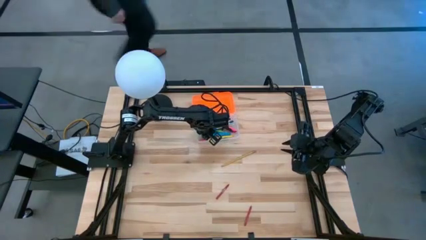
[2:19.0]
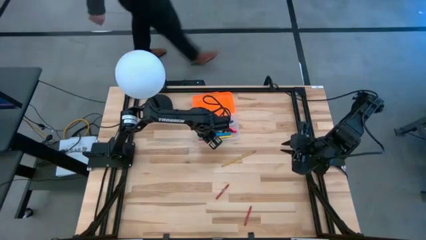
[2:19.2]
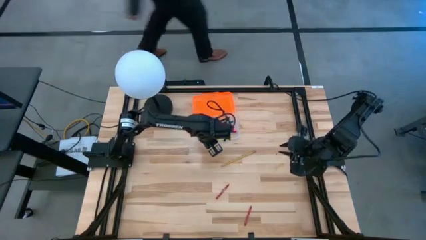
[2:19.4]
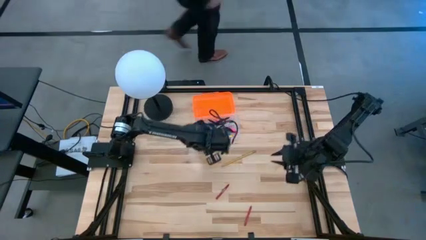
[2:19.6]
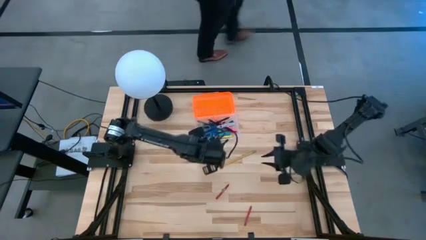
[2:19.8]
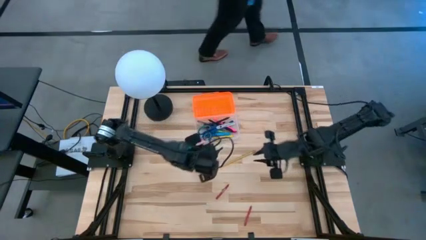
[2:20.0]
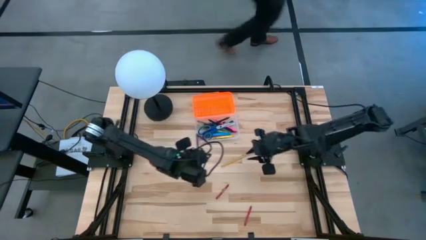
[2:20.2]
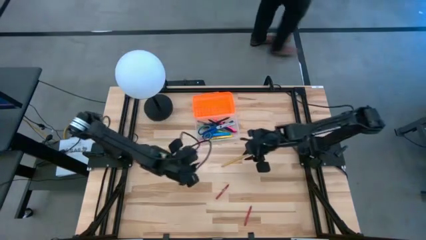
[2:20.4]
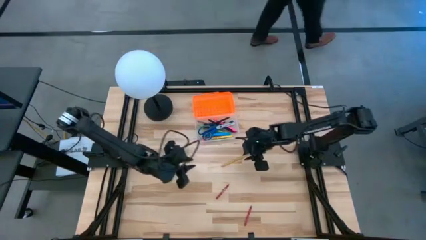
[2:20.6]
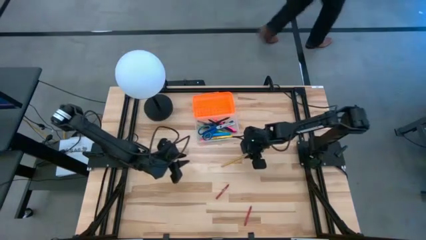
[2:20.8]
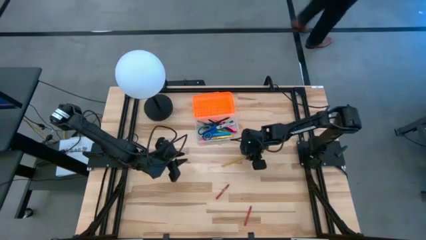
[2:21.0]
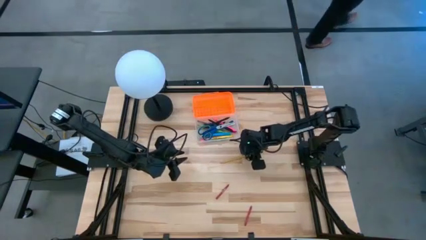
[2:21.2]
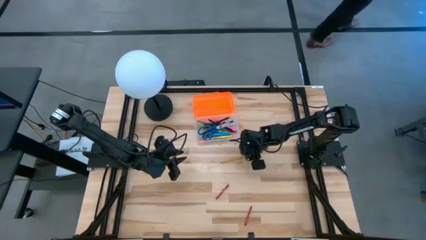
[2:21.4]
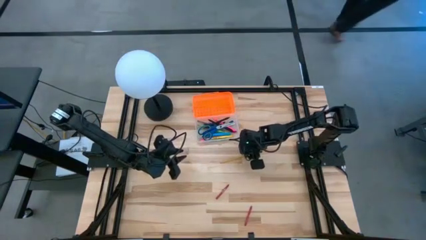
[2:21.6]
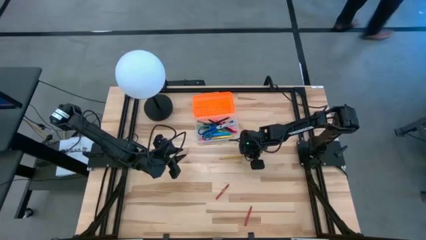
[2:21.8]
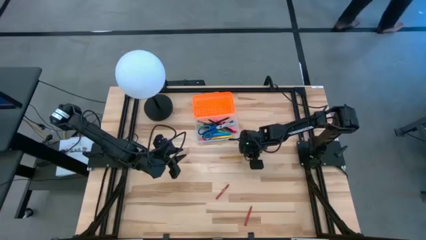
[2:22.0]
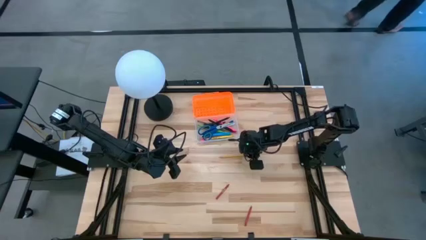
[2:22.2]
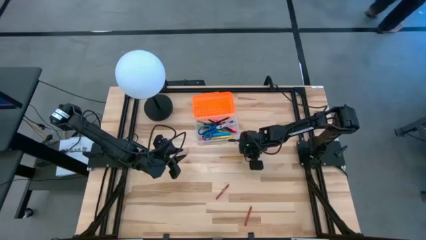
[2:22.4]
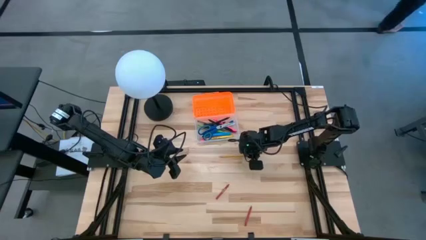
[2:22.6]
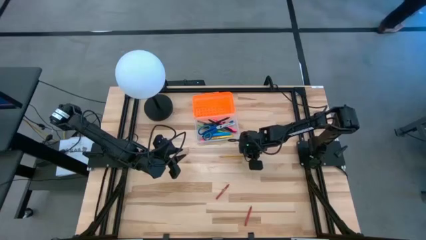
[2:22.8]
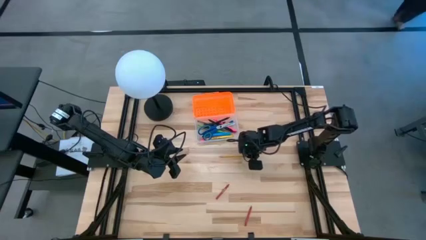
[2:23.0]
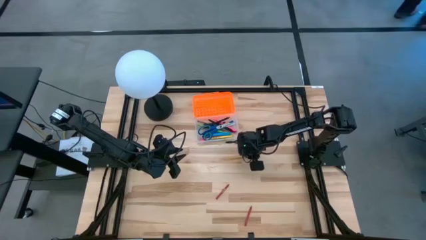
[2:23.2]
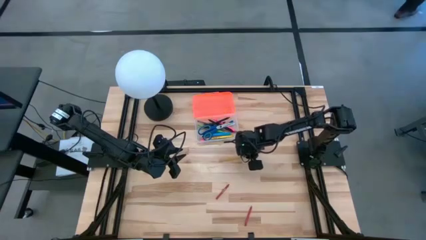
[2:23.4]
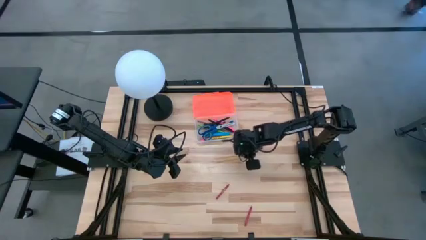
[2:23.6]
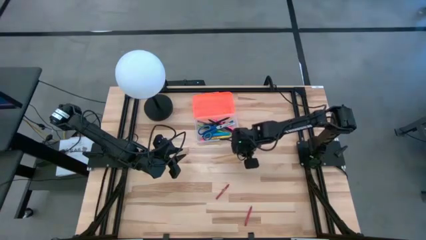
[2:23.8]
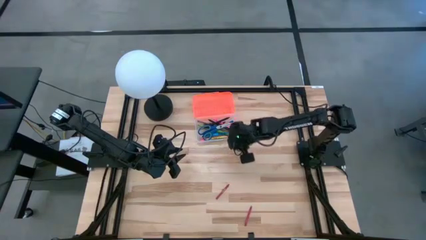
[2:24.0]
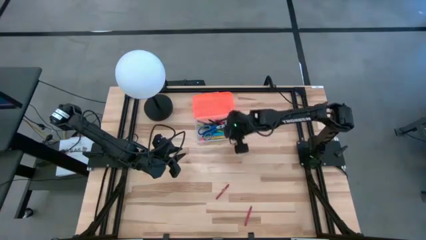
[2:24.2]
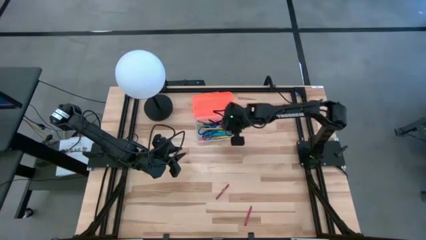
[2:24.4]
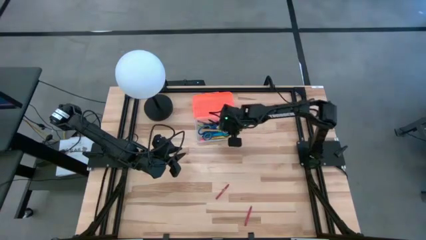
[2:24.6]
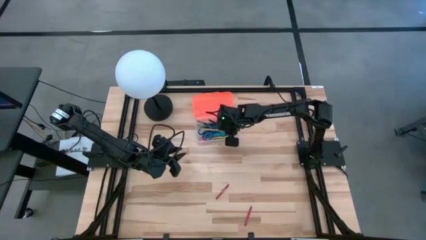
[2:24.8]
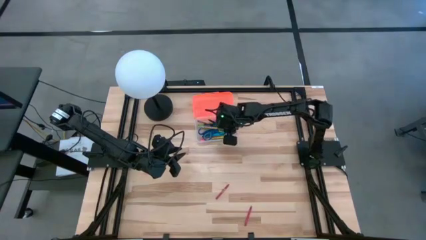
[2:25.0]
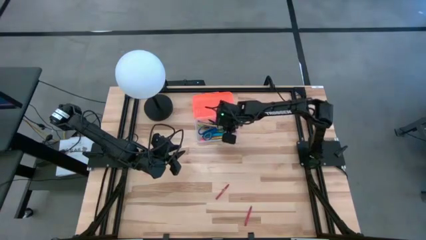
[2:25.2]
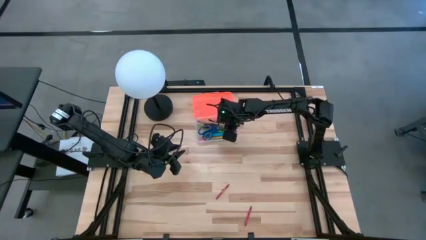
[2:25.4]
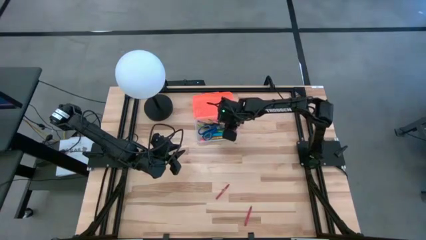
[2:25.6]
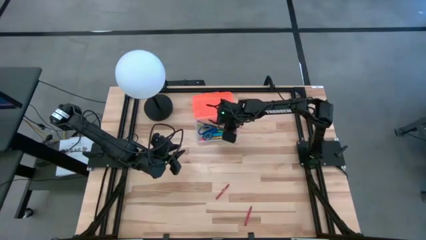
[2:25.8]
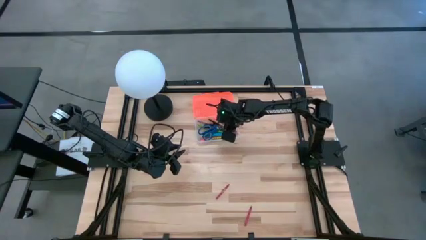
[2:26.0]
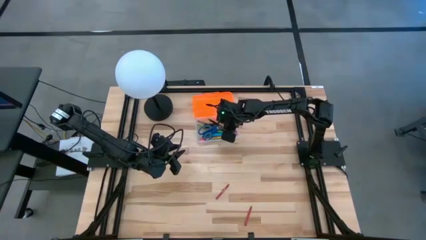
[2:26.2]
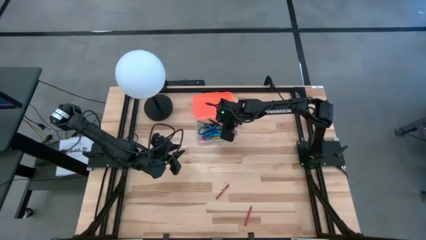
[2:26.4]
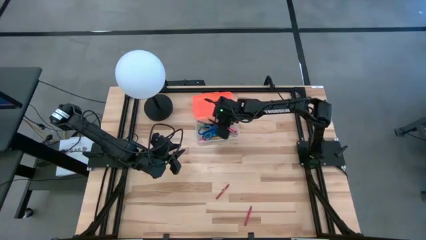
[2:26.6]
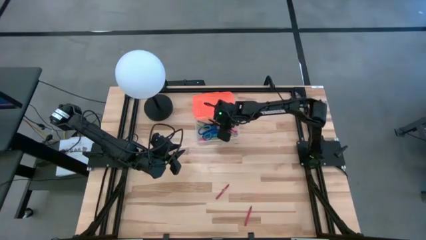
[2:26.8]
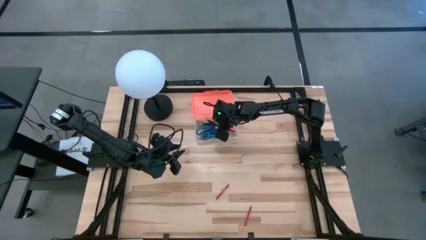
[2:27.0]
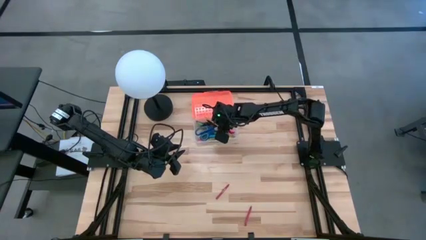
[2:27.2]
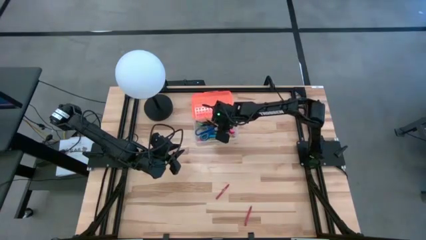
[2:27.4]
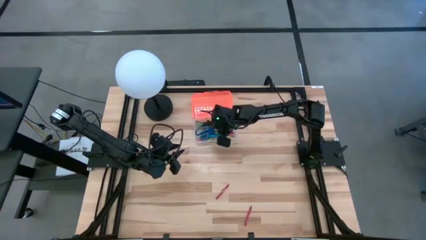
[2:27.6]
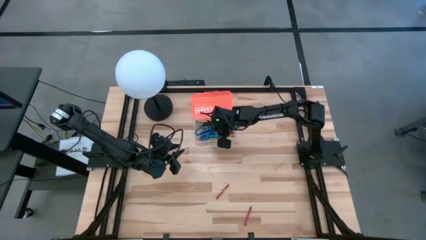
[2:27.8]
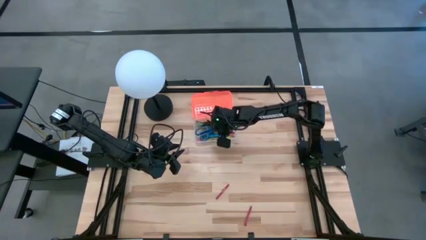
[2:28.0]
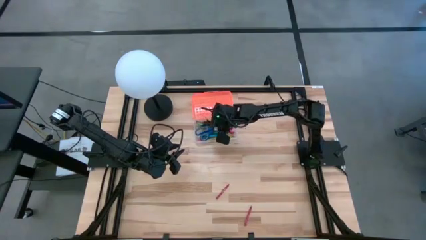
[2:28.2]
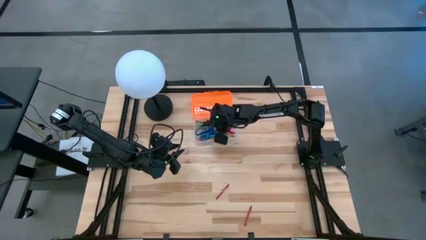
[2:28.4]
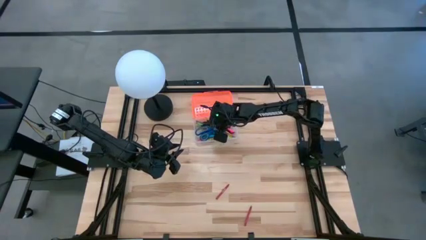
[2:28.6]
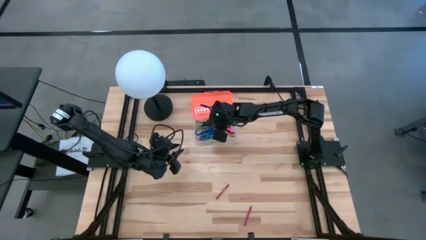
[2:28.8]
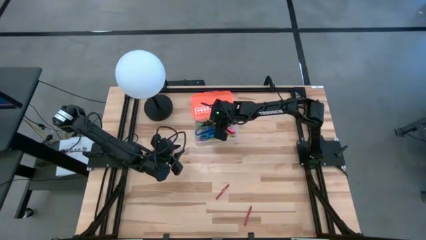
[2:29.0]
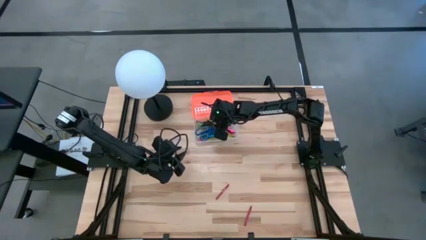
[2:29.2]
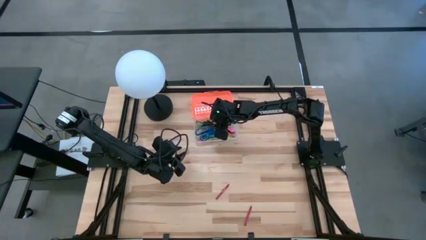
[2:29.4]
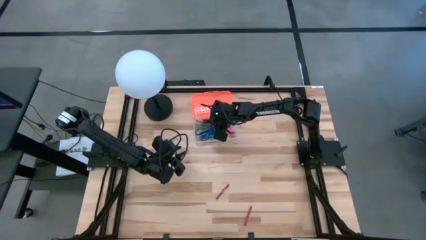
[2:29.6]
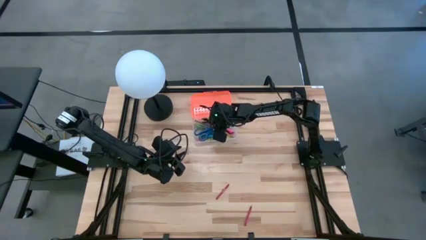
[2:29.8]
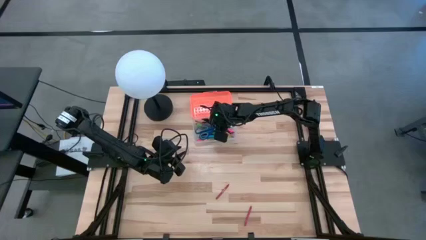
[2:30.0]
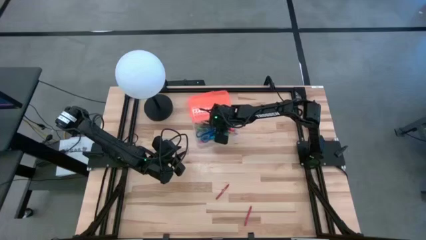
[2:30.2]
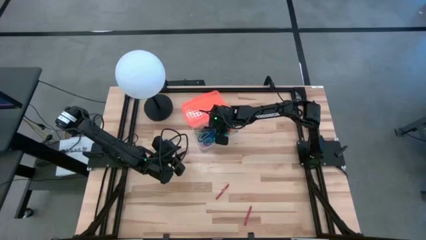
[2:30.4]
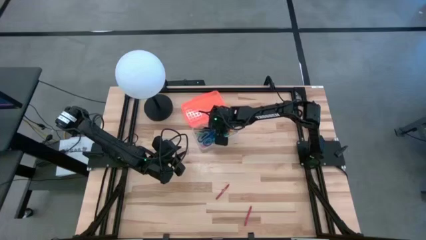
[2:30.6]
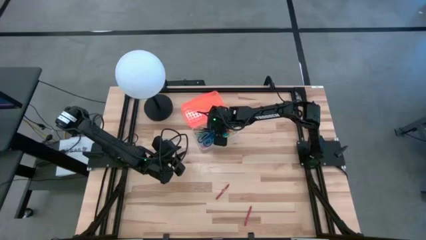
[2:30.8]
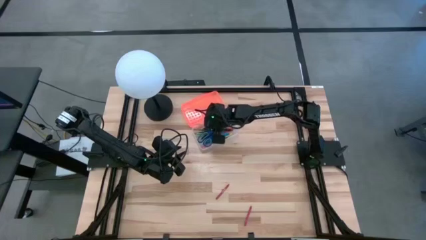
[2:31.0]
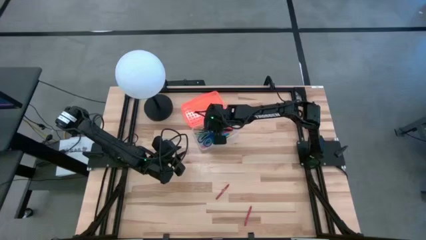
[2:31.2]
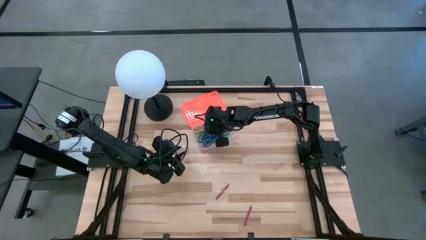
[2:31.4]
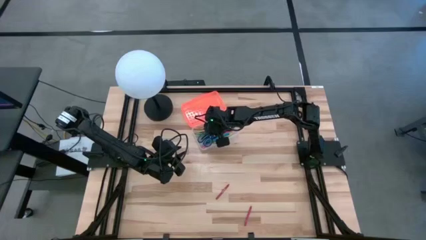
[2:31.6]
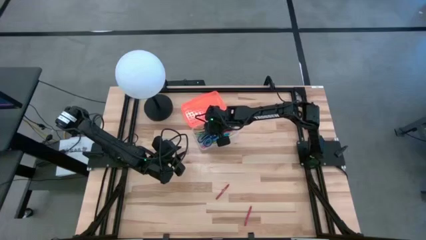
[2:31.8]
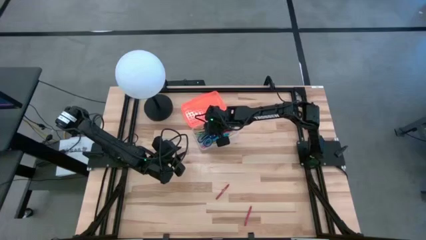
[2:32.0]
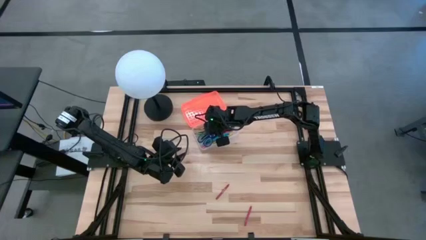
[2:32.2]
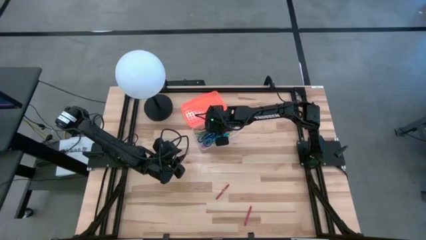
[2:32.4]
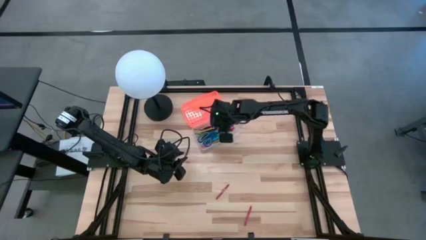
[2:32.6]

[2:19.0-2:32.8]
Task: Pick & place school supplies into a supply box
Put the yellow pencil into the supply box

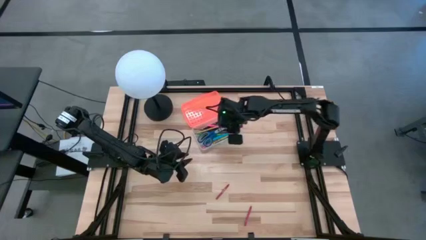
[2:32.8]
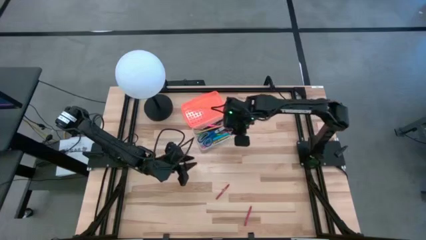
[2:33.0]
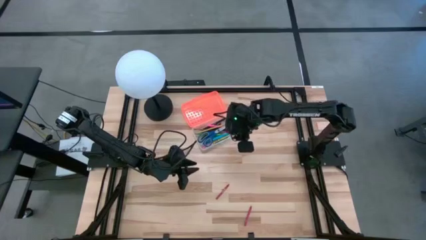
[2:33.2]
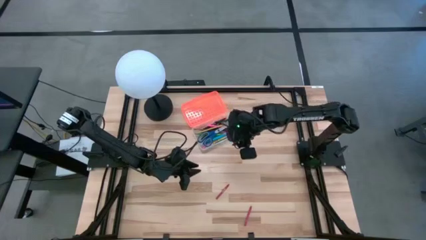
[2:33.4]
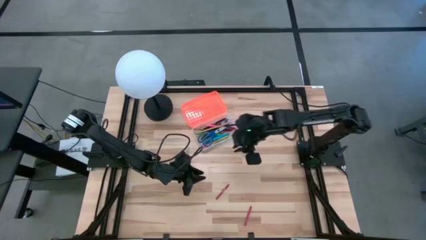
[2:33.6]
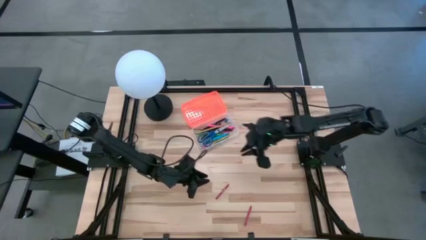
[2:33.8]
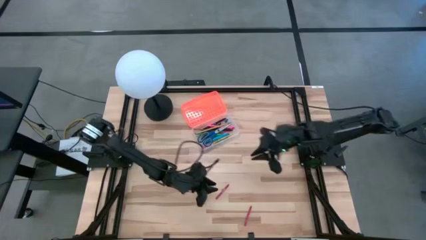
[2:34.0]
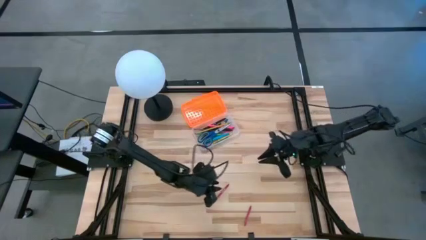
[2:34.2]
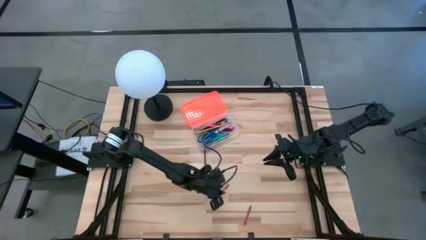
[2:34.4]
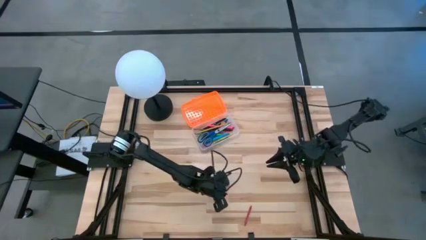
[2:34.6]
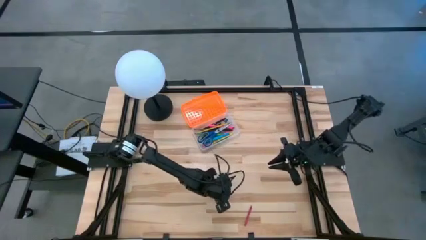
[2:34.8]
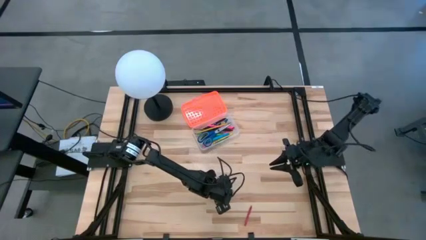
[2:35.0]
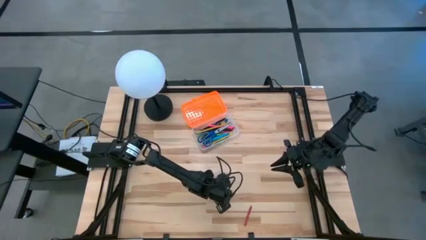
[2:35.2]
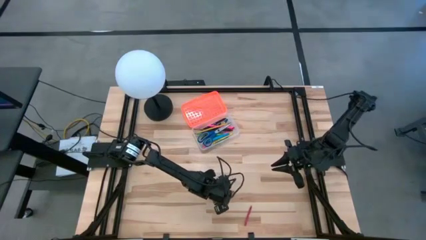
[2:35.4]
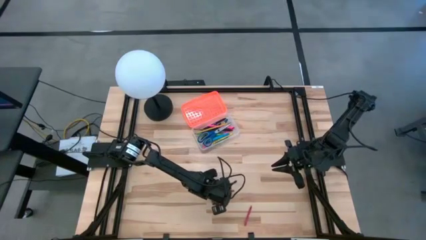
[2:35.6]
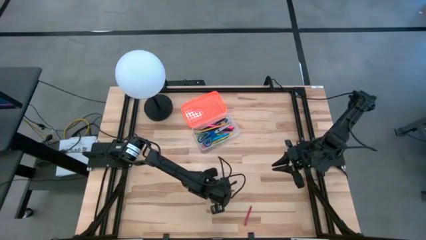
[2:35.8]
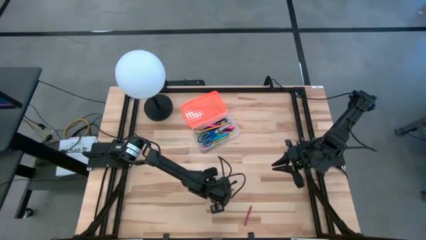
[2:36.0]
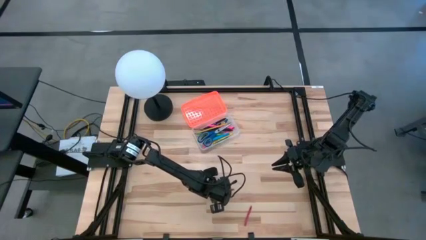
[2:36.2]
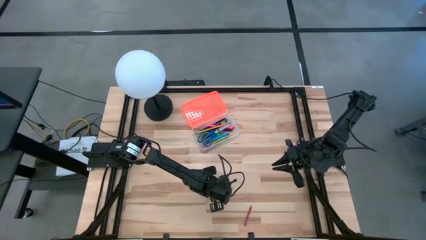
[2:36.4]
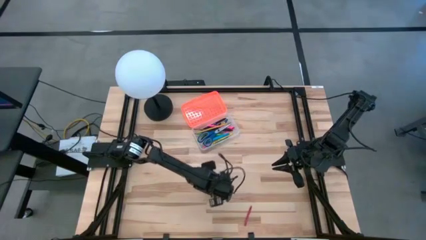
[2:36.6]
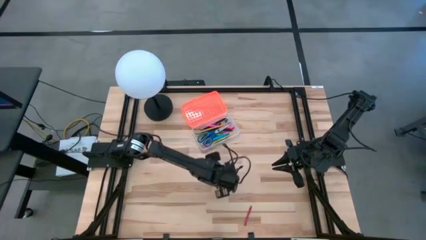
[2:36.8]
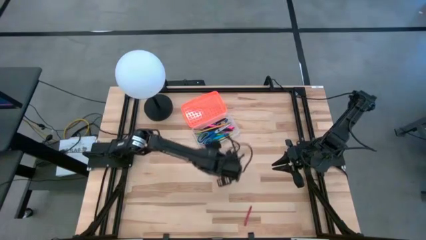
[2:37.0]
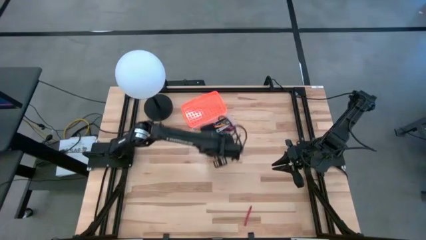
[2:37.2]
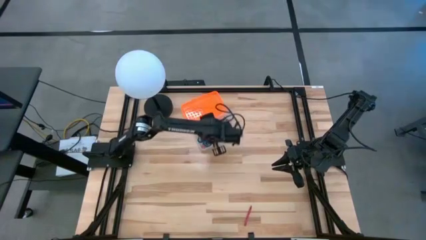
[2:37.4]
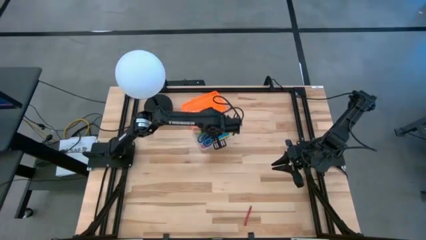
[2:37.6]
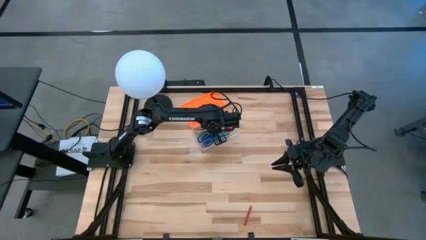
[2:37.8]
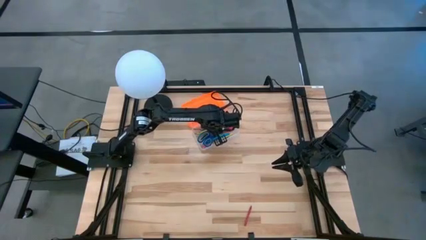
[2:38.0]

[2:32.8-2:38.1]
Put the top red crayon into the supply box
